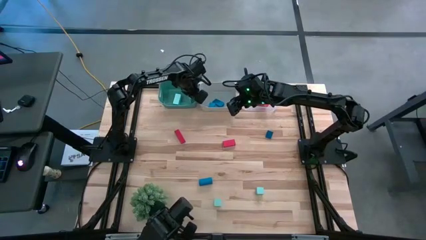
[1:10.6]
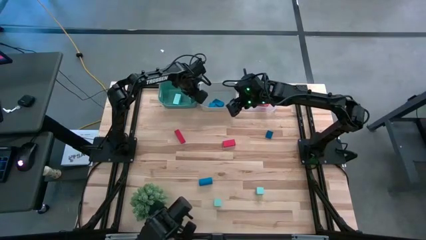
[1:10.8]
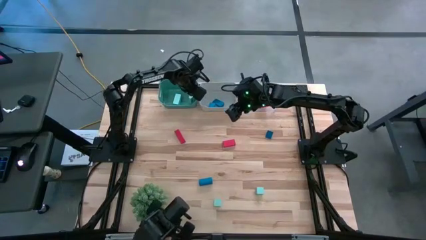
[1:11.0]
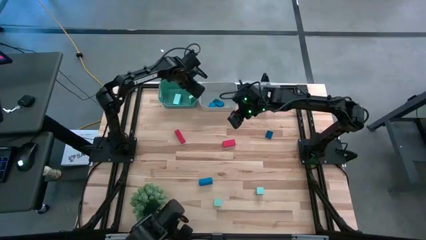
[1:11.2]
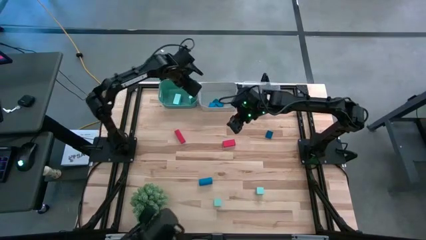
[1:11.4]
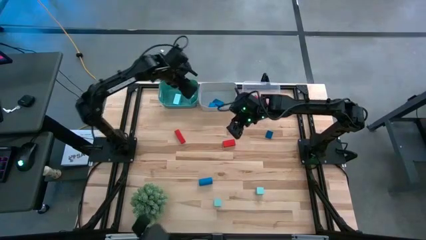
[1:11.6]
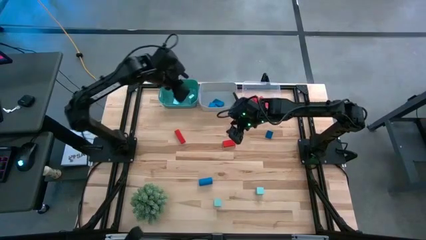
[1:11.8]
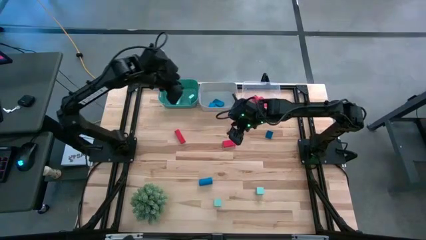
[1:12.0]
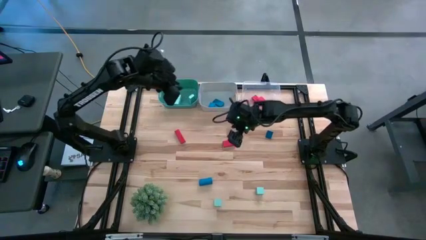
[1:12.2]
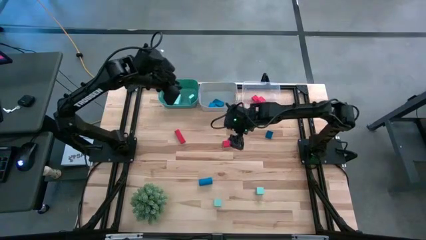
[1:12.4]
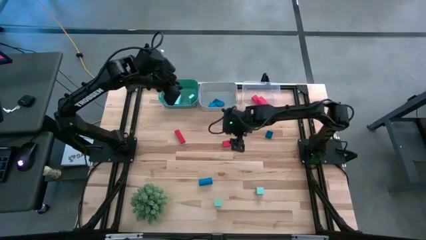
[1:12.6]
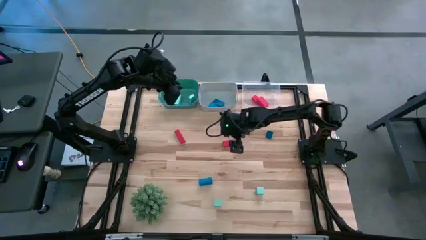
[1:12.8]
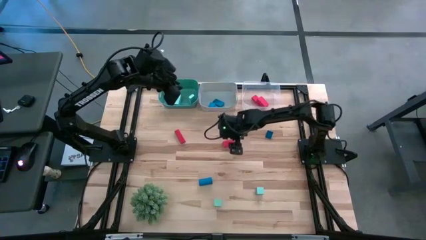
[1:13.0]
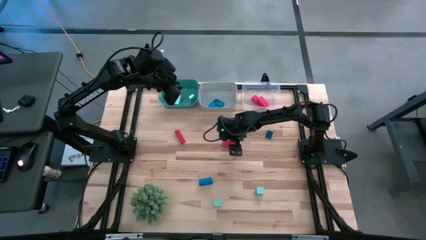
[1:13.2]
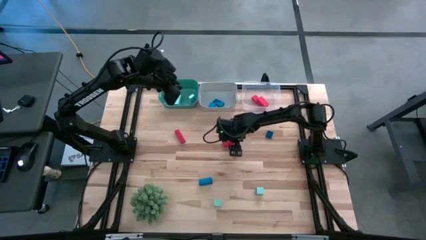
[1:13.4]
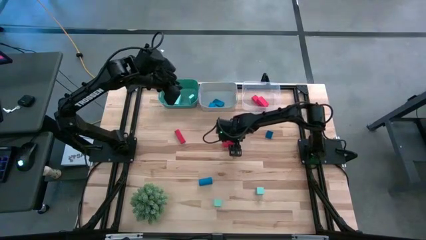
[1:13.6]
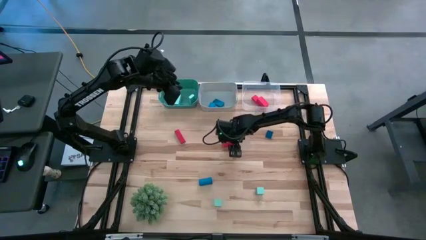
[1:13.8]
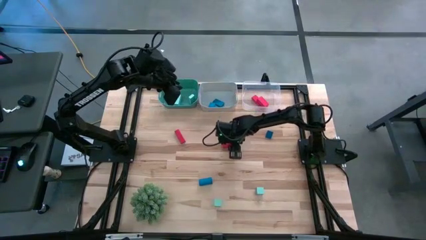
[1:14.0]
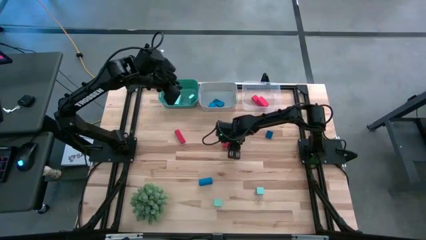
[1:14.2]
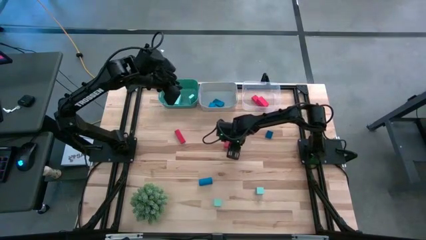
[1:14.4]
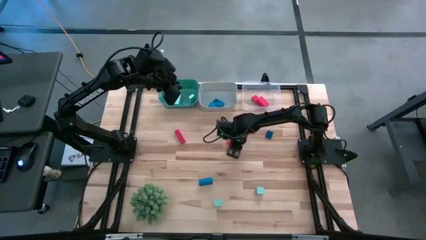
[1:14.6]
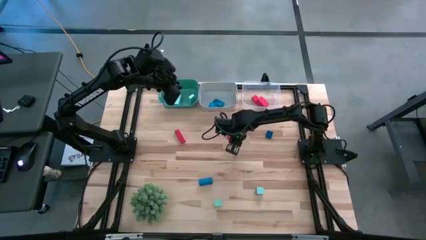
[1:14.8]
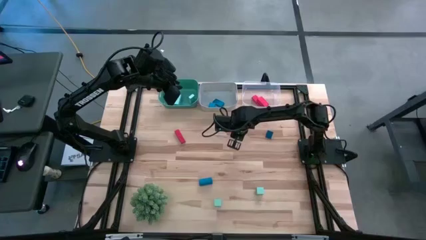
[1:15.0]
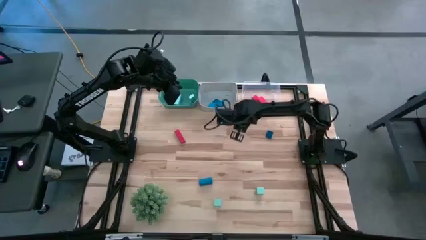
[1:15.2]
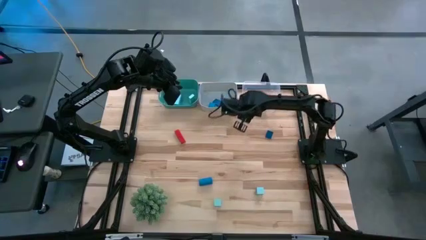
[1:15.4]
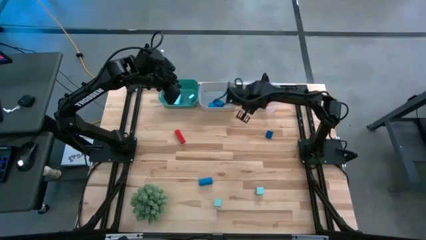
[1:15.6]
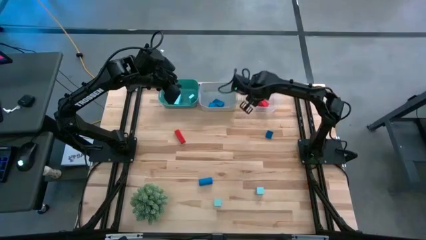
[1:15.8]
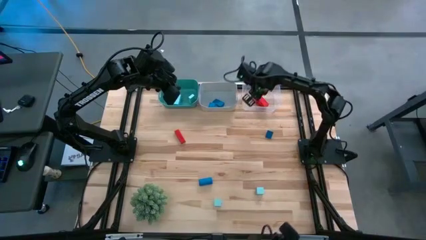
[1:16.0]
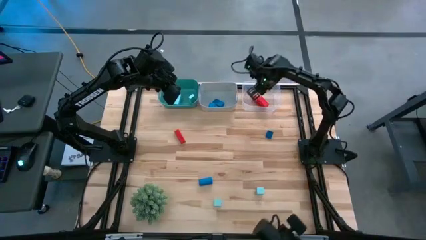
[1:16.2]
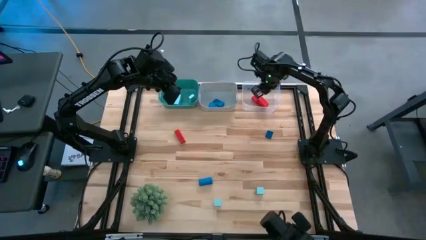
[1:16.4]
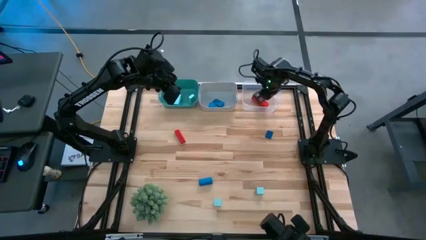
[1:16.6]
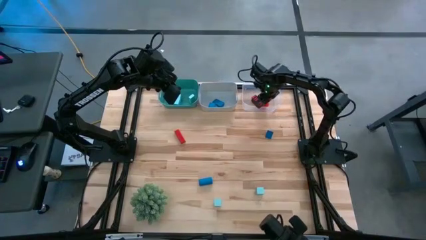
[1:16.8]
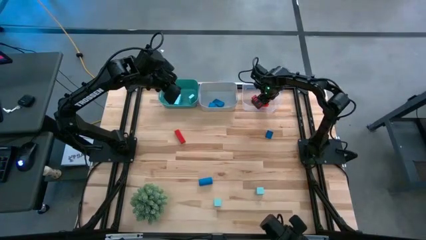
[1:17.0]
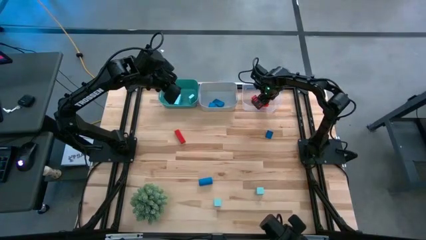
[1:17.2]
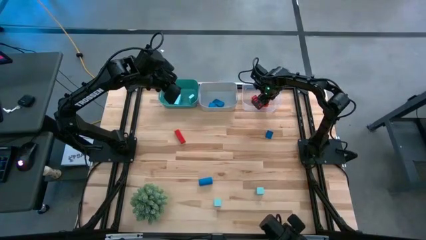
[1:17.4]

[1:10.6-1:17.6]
Task: Sort & place blocks by color
Put the orange block into the transparent bin

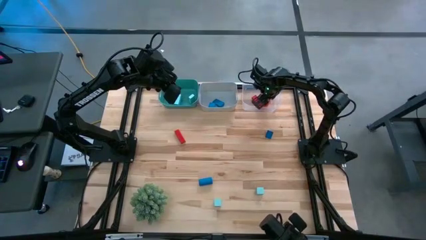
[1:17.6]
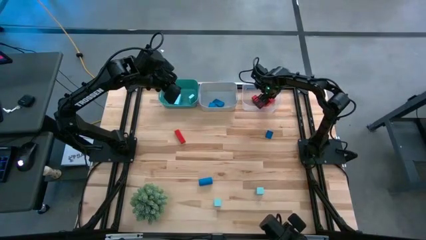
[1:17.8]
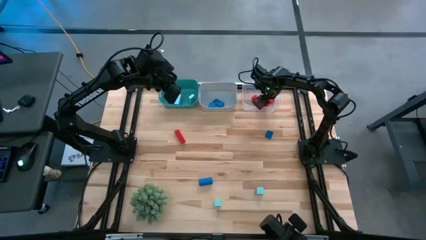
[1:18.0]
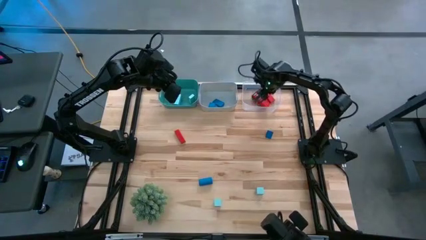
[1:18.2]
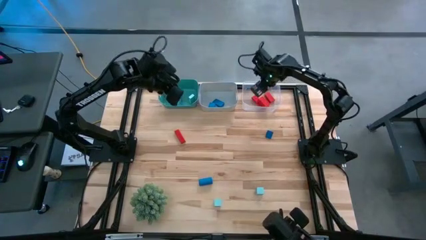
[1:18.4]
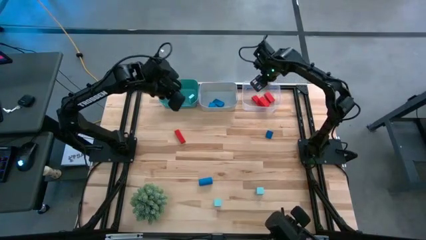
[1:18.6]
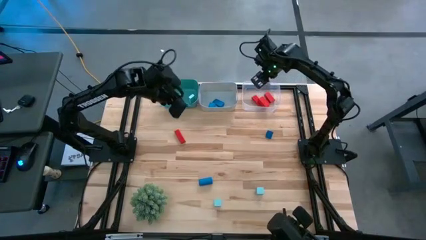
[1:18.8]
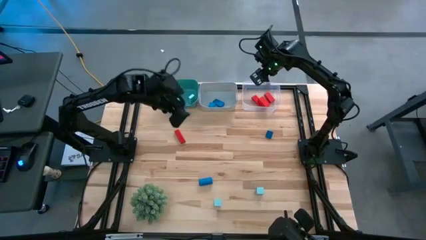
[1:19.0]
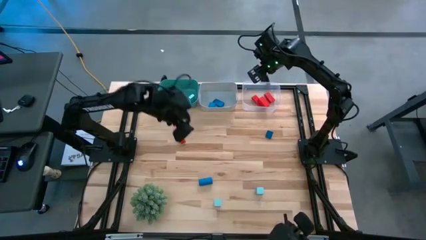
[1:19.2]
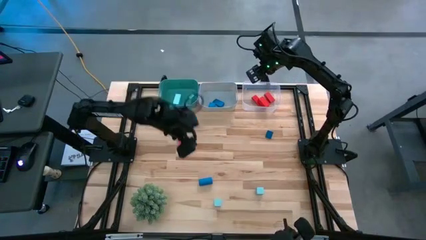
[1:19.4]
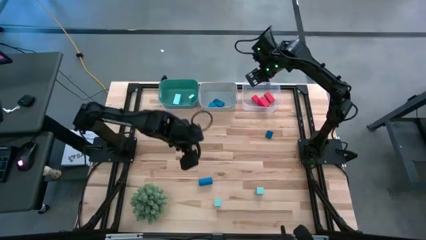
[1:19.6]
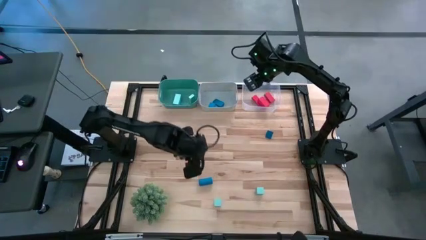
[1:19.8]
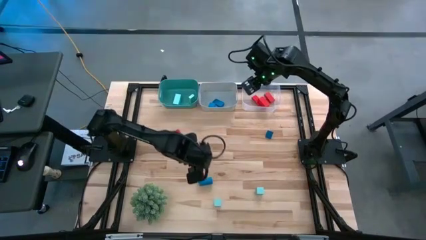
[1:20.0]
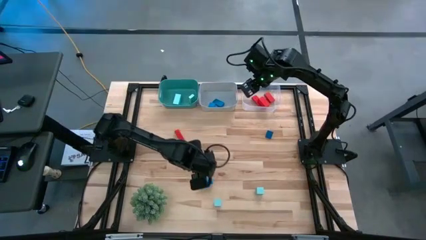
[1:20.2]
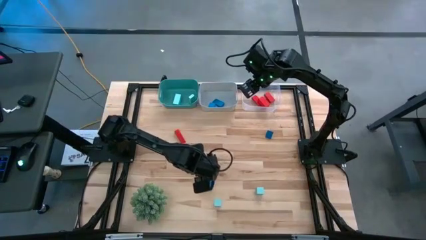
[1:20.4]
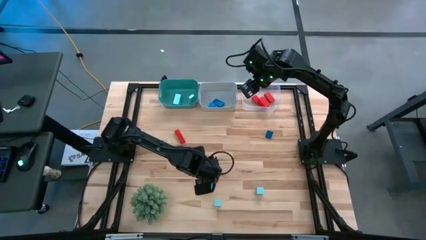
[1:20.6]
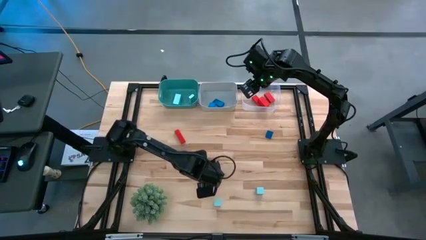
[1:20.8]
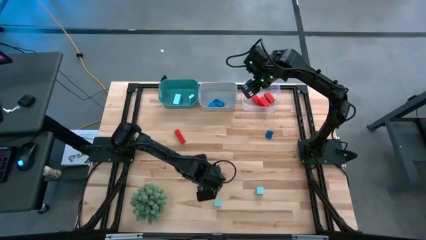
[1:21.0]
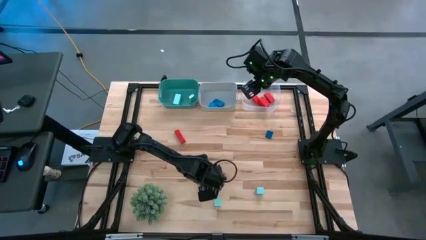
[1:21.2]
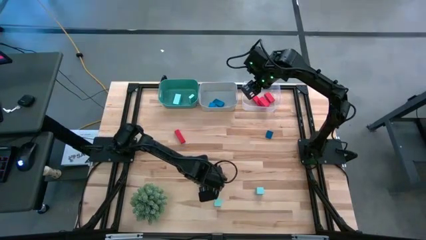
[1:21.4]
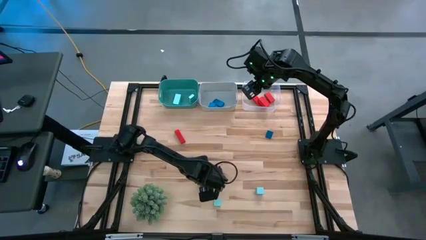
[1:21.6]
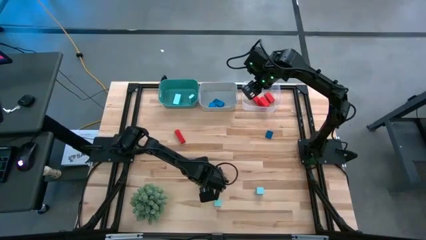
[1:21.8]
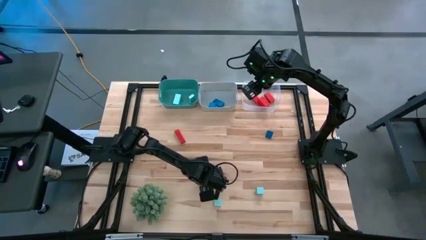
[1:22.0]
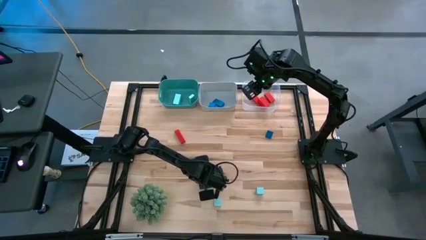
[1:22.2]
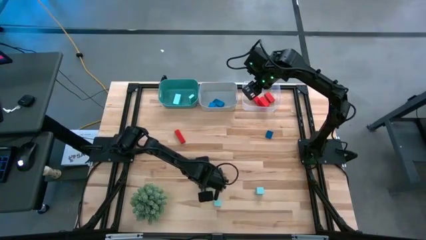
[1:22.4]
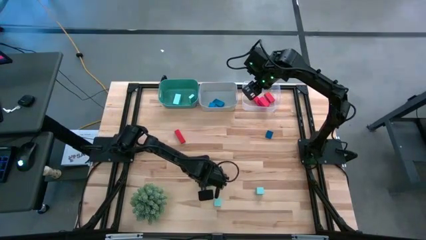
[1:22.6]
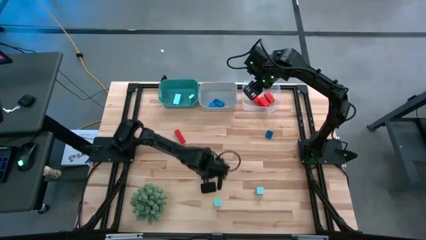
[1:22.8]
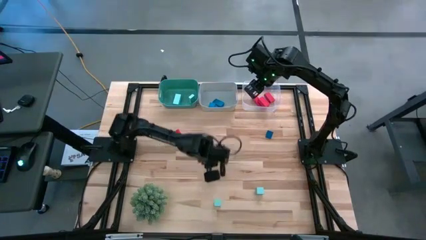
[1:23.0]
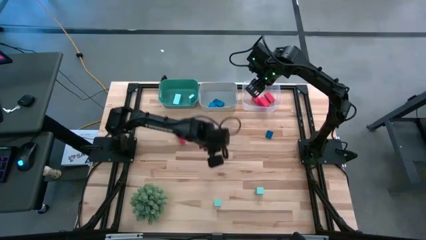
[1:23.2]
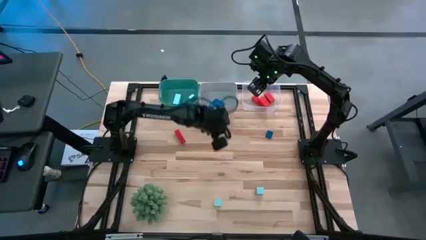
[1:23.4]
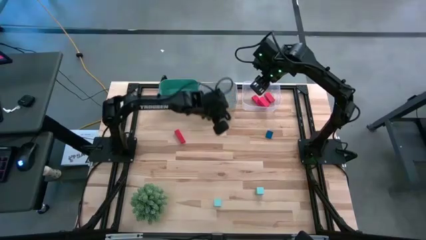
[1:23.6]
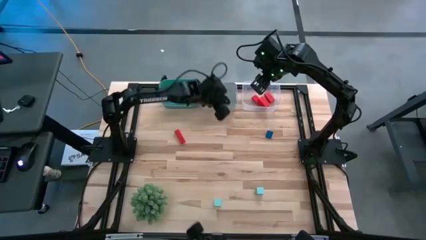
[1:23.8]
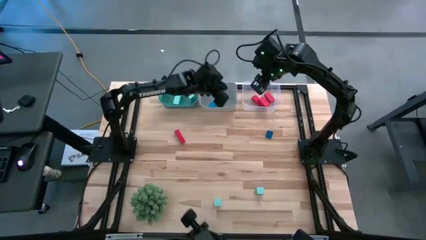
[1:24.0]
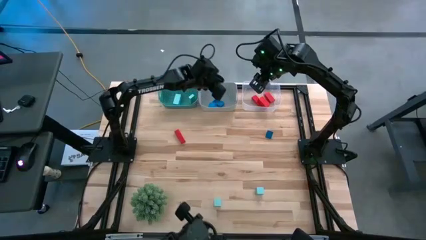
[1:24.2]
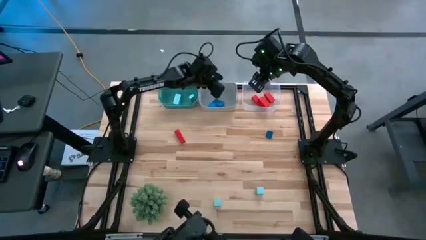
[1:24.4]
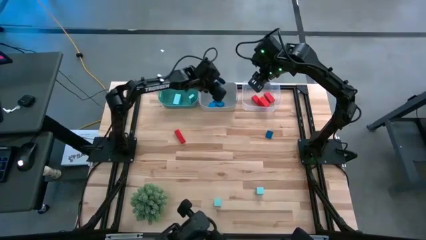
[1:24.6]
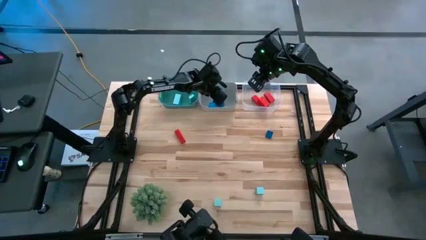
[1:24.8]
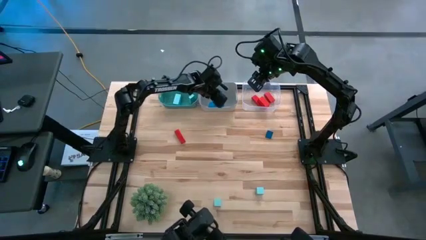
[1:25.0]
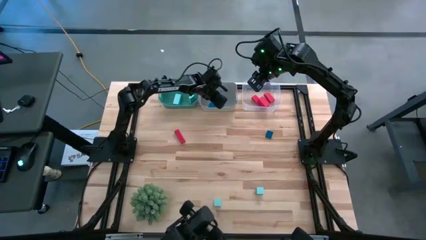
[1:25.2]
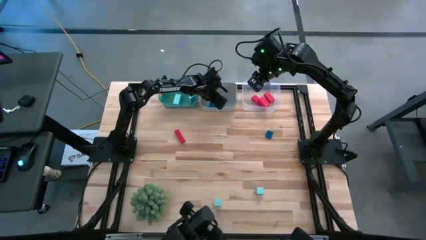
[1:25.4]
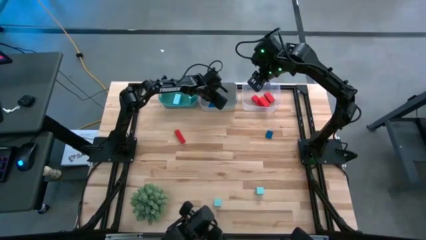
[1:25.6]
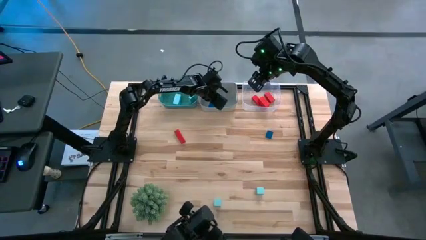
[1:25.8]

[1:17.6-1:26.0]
Put the blue block into the gray bin
